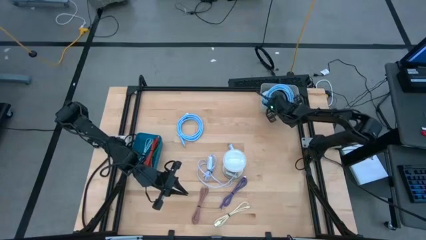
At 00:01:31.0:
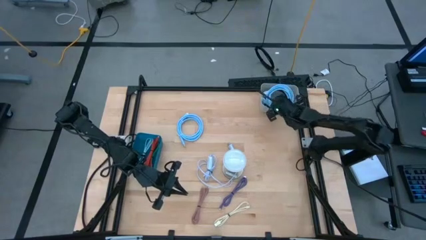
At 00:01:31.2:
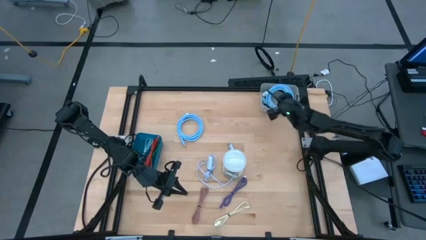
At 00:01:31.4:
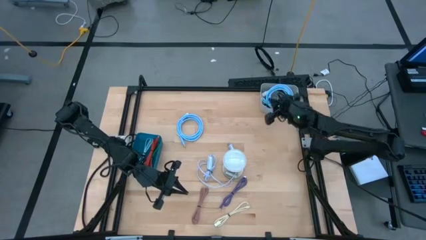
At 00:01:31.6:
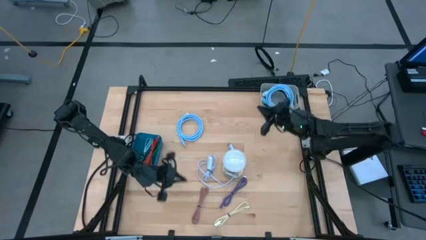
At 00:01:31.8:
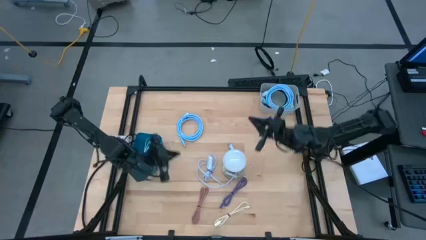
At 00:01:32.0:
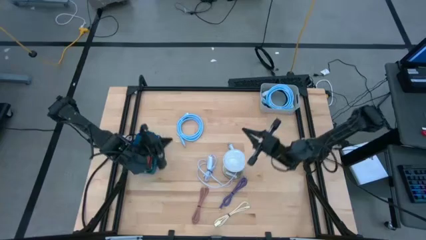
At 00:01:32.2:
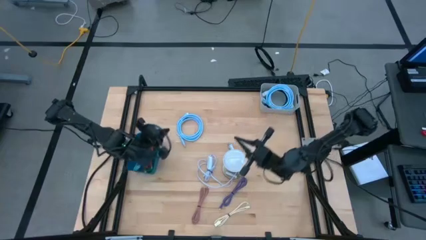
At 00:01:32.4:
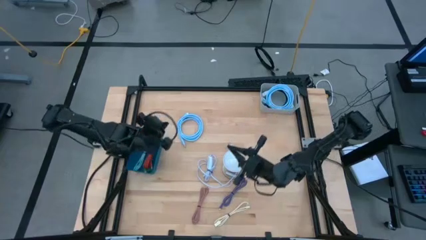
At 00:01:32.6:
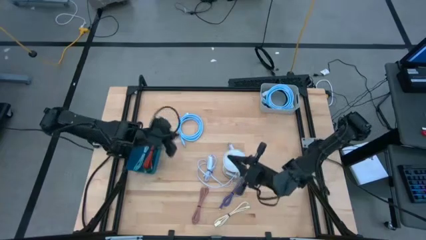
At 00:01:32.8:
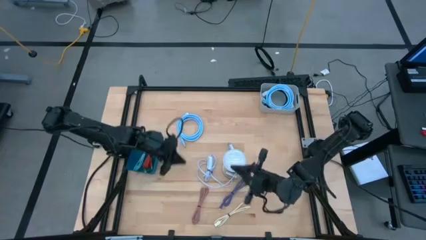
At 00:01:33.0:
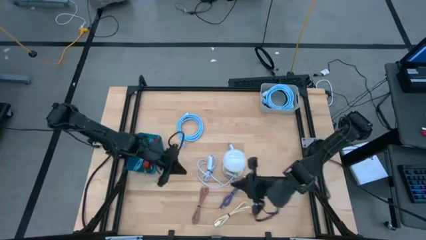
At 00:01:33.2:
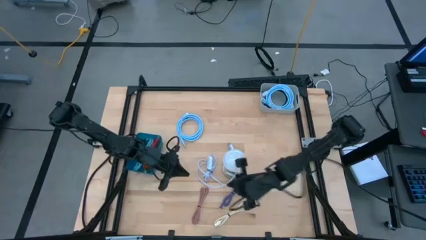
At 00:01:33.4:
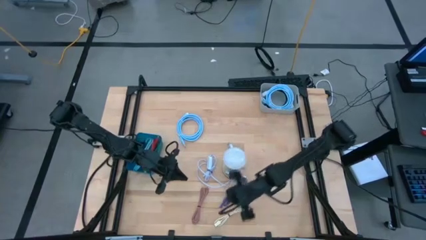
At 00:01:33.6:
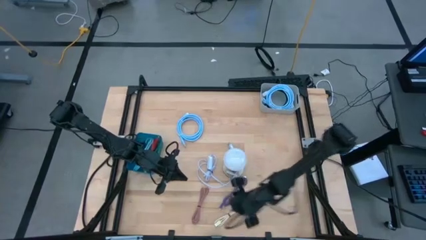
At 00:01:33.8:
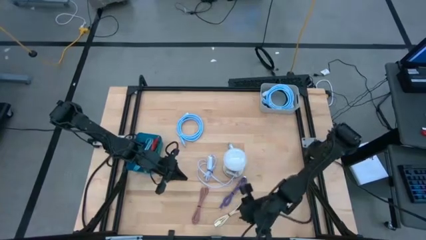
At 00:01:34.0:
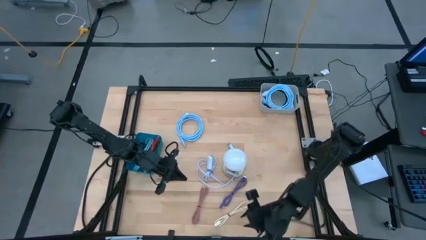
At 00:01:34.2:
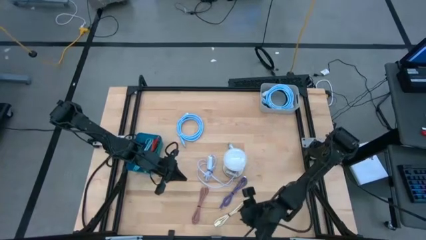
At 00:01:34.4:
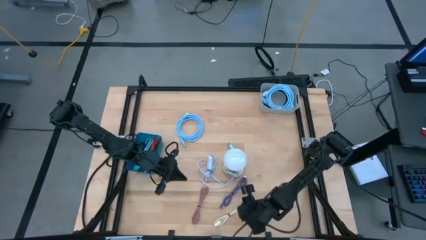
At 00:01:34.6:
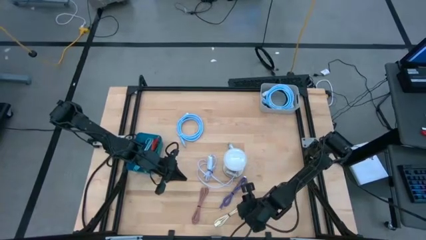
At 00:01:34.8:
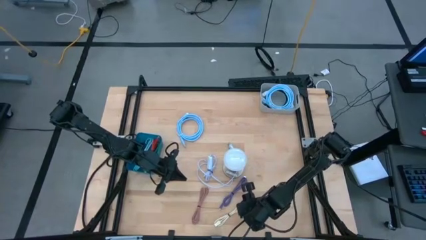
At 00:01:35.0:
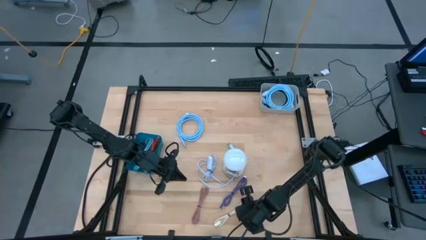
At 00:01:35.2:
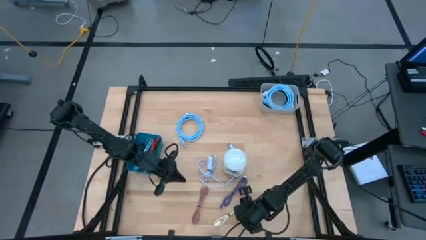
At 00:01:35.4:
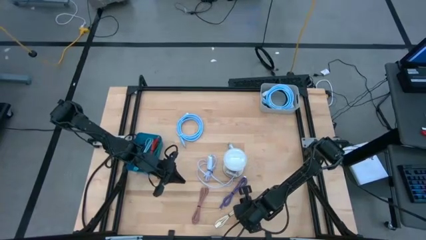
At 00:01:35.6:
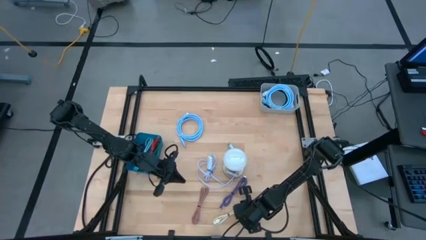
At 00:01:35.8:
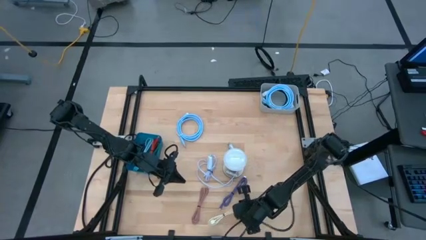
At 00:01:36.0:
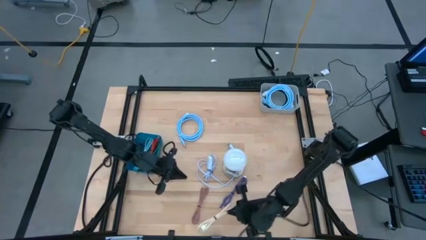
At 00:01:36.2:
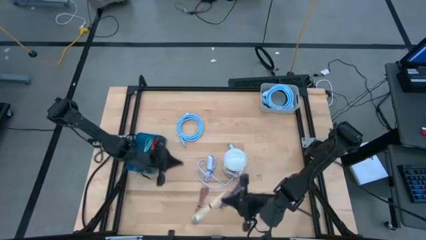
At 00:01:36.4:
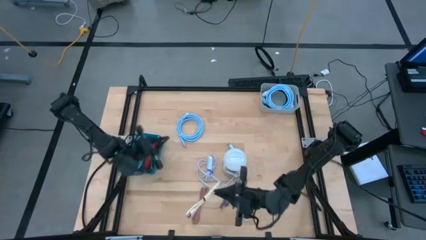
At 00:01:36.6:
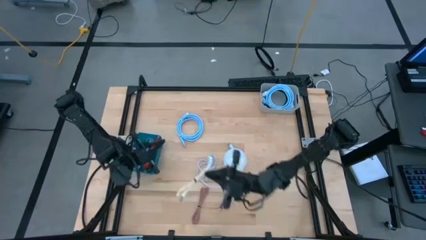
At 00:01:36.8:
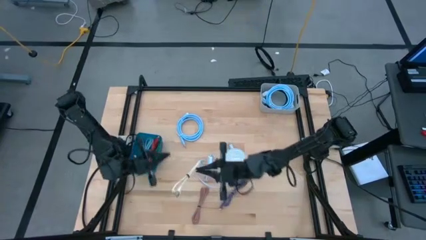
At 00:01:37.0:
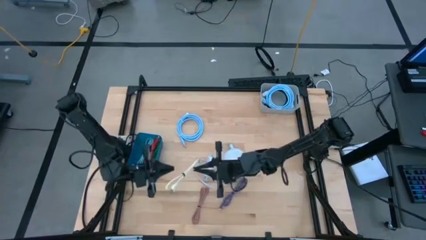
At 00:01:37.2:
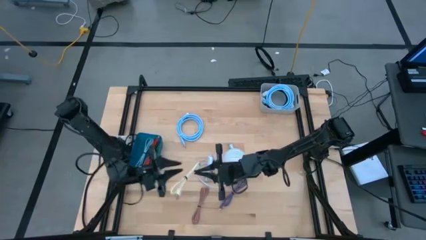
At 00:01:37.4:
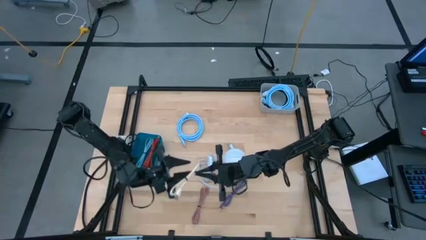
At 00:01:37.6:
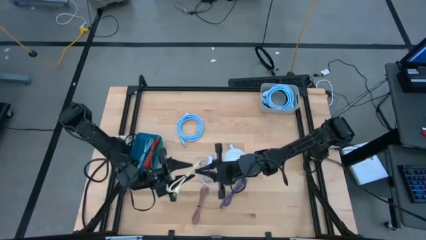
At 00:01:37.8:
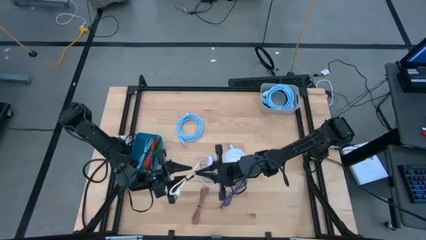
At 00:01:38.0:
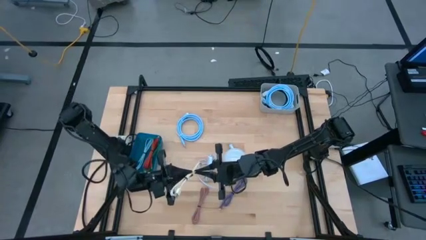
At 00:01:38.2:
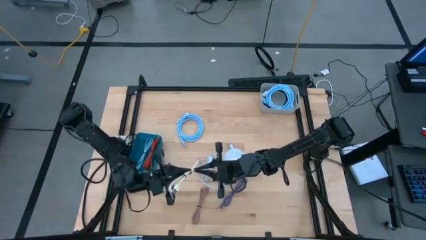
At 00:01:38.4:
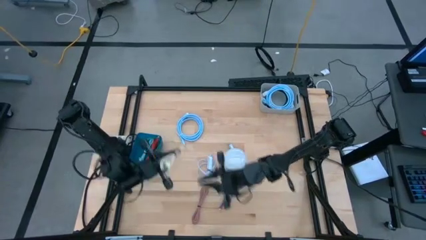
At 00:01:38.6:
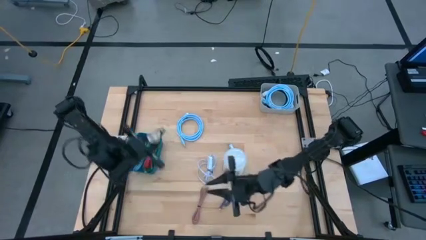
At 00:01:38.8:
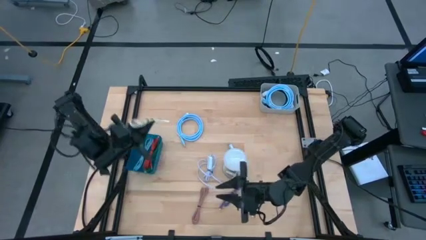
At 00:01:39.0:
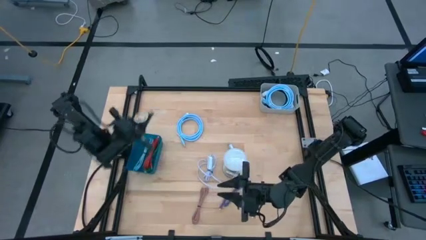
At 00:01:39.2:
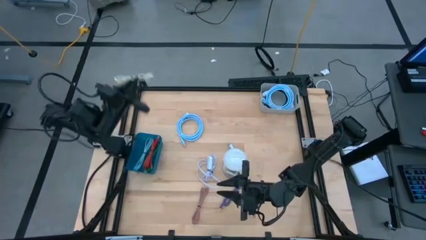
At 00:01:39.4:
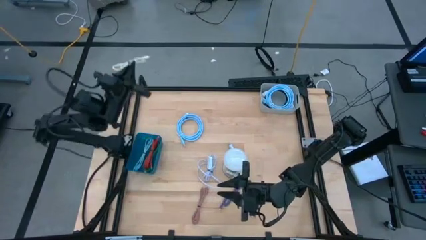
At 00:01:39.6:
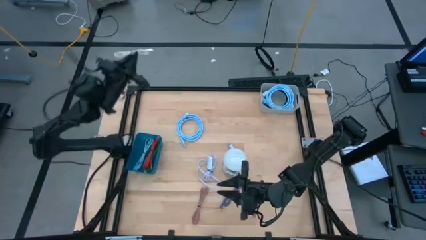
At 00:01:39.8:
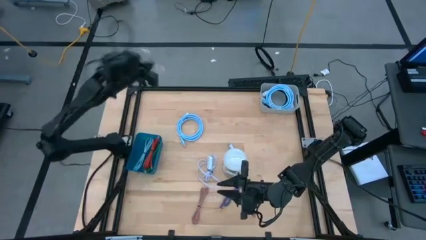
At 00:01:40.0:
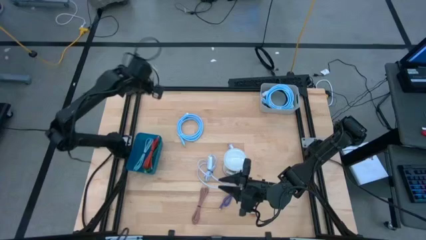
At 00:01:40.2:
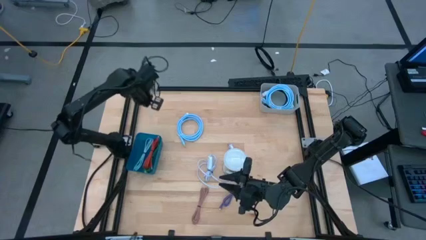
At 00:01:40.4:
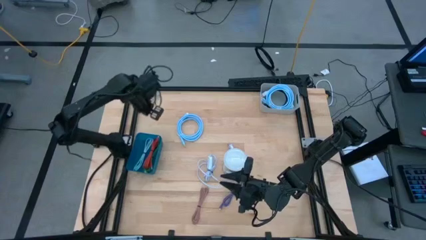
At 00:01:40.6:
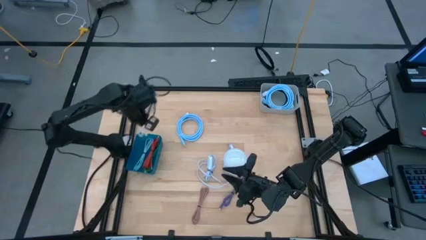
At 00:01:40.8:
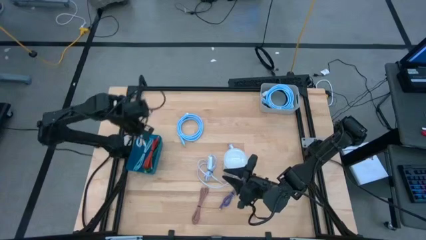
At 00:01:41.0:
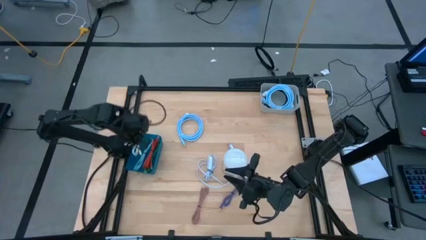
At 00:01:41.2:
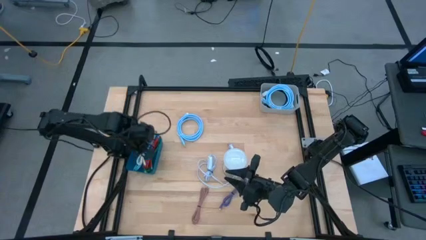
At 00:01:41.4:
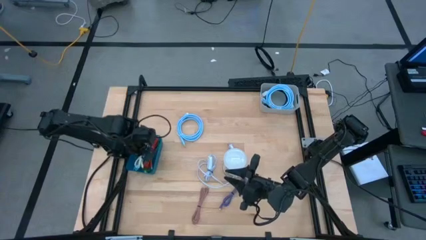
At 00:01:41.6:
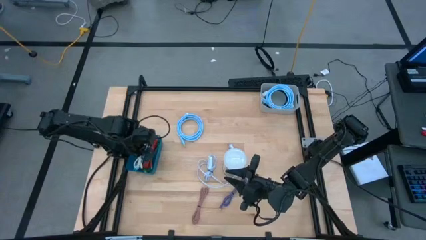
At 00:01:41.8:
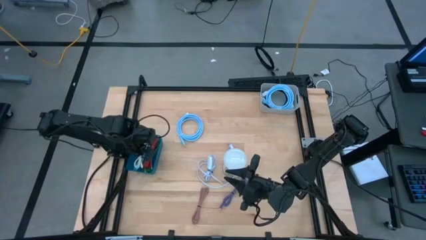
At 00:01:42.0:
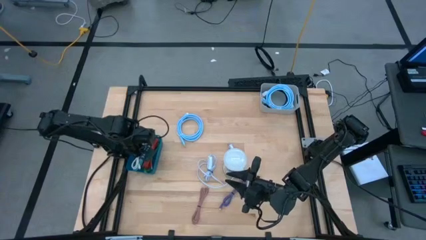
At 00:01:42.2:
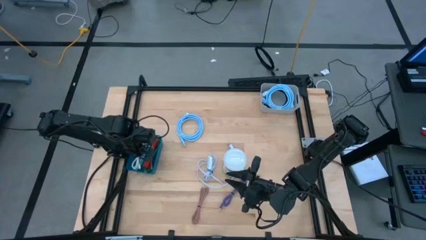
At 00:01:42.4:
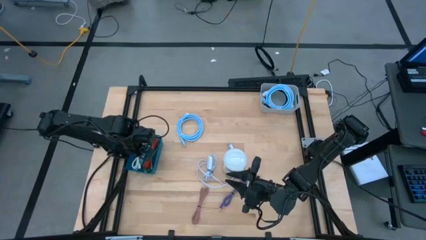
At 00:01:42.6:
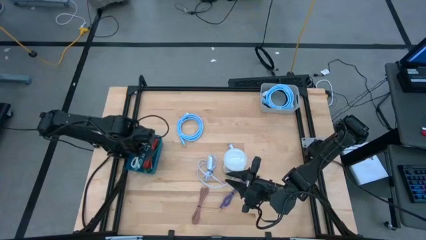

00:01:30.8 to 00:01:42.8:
Task: Pick & Place USB Port
Put the white charger cable into the blue bin

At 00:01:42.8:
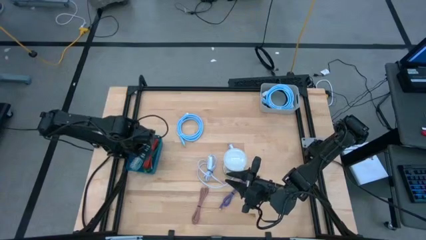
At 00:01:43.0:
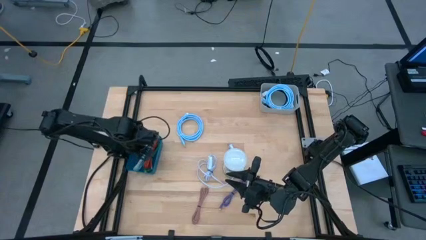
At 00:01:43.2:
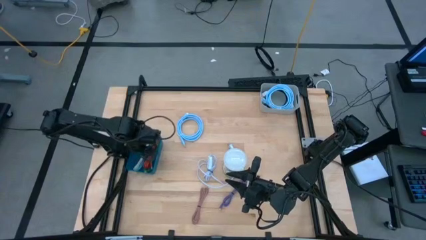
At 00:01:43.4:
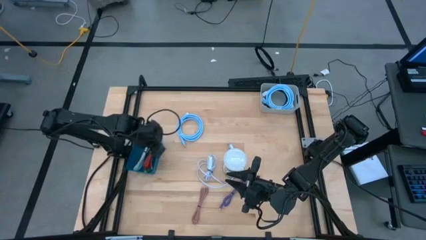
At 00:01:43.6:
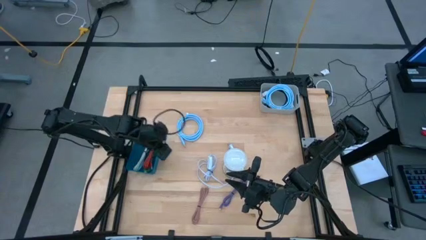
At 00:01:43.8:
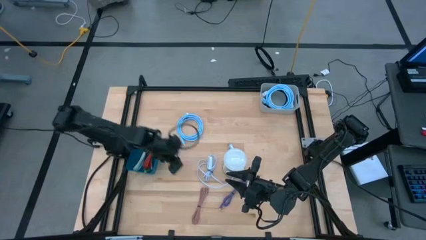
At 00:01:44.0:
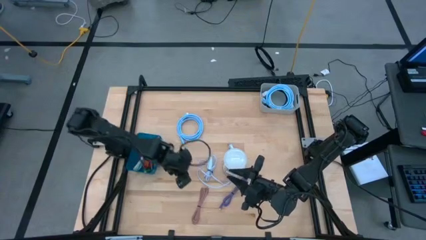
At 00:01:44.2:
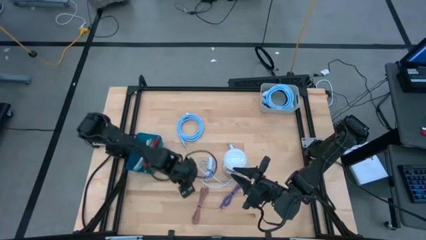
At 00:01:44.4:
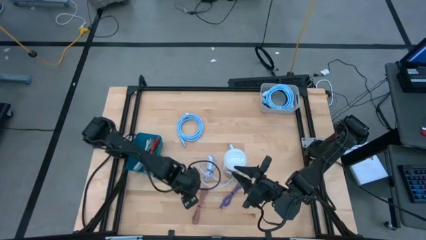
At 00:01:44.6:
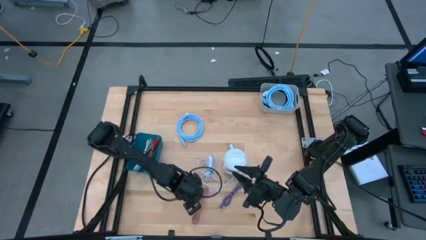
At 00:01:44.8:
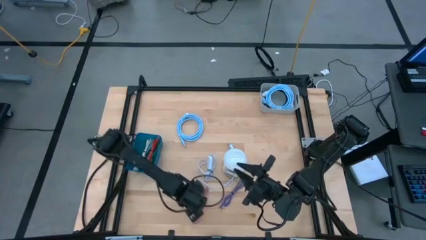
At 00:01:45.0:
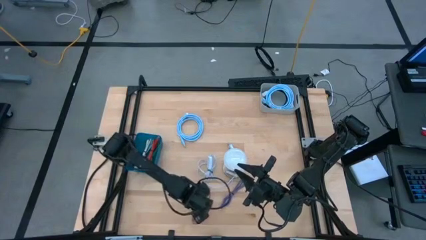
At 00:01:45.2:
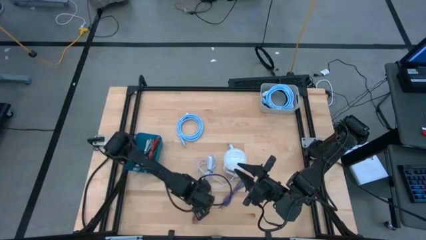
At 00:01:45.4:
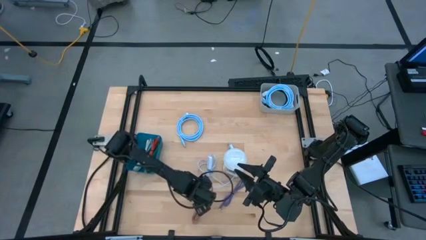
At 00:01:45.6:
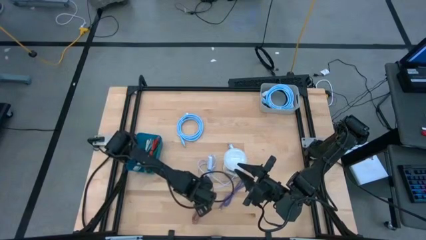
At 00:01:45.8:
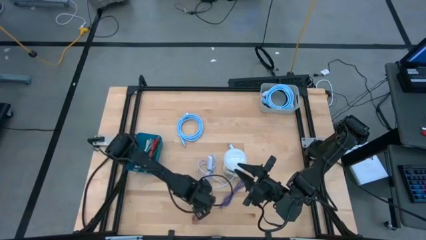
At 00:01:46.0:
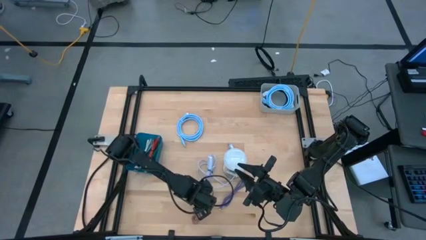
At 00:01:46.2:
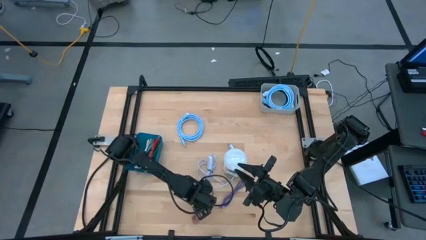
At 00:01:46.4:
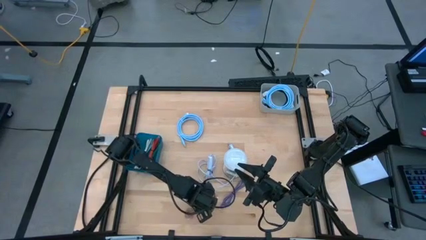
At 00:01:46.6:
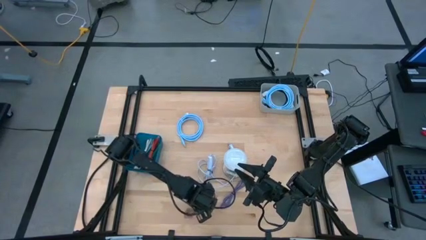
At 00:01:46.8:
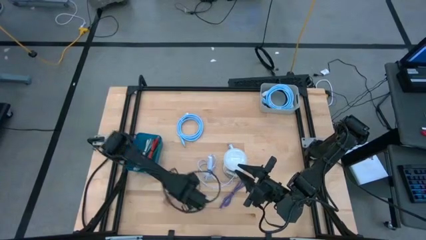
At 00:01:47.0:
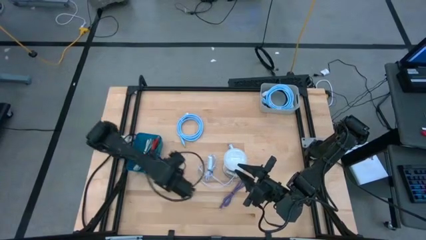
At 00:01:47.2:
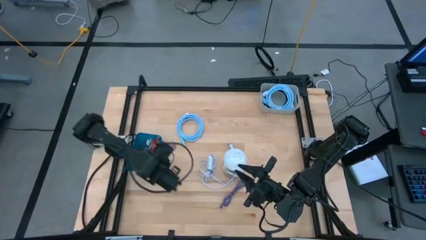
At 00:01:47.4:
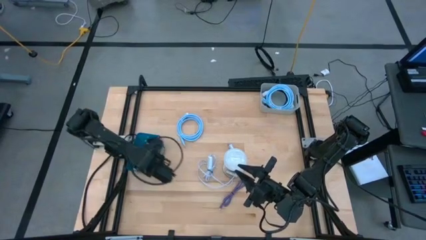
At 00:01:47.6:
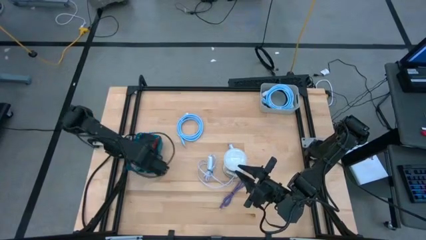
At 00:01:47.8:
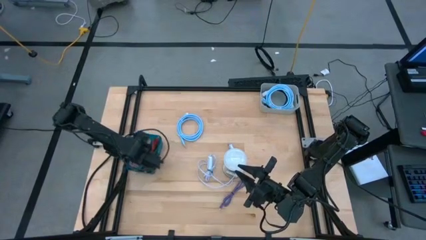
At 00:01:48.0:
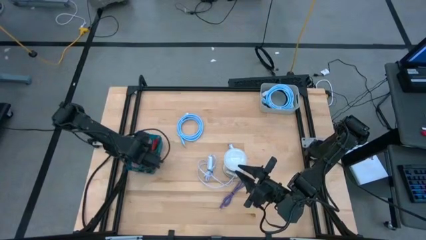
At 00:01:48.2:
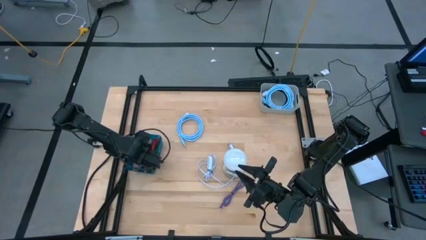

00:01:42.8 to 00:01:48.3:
Put the pink charger cable into the blue bin
